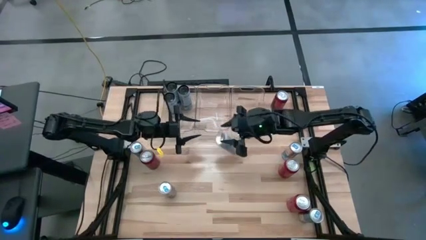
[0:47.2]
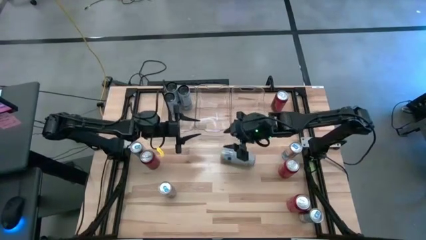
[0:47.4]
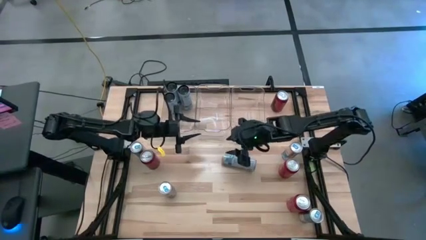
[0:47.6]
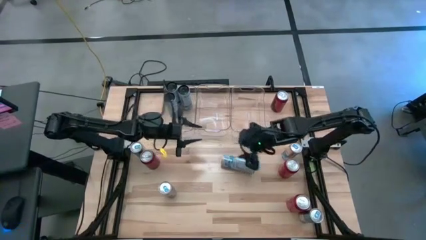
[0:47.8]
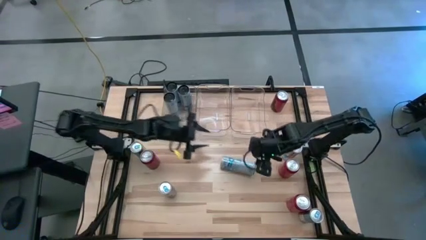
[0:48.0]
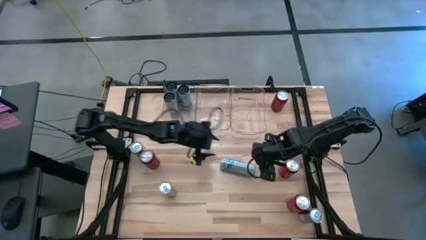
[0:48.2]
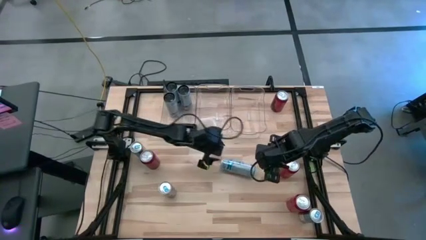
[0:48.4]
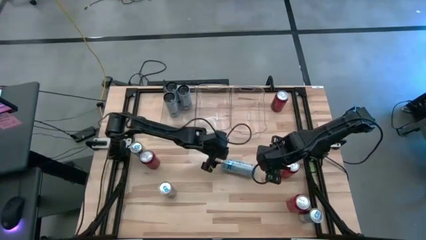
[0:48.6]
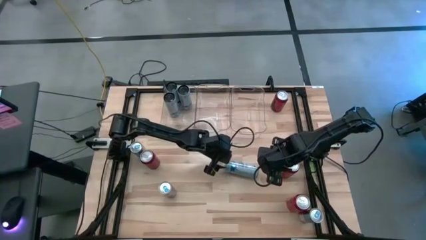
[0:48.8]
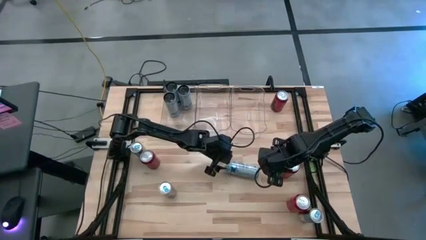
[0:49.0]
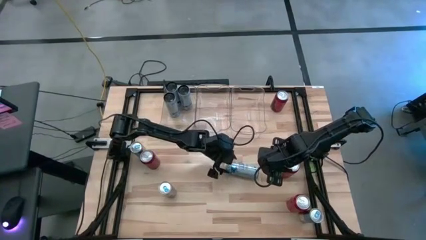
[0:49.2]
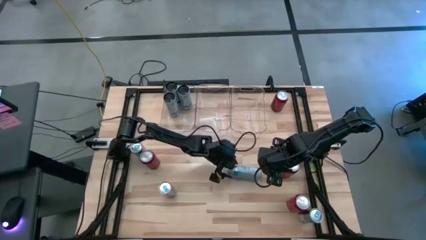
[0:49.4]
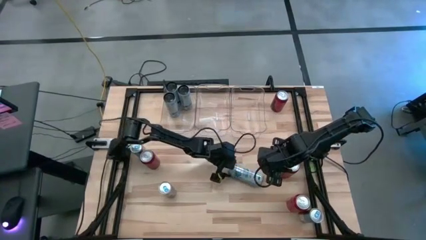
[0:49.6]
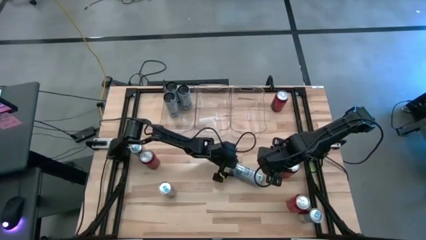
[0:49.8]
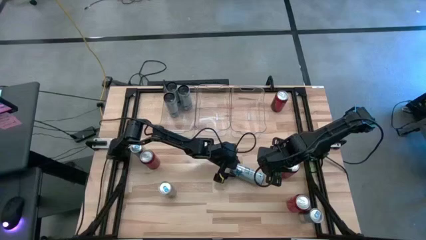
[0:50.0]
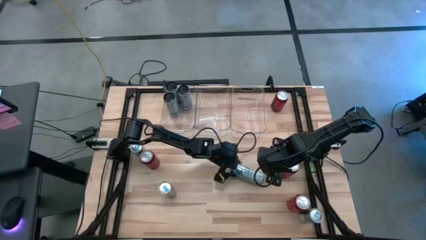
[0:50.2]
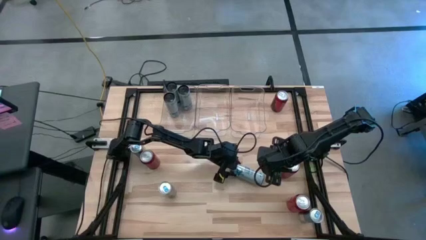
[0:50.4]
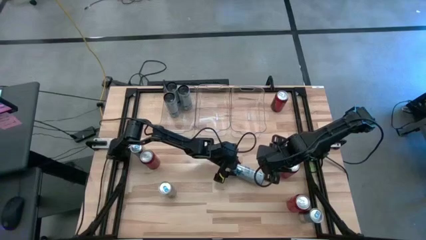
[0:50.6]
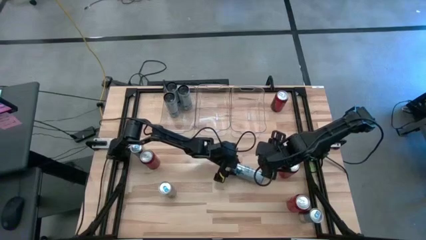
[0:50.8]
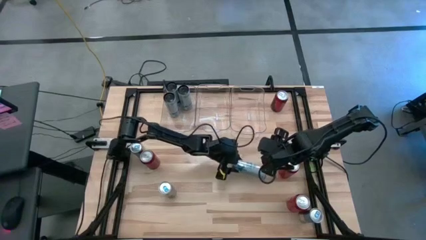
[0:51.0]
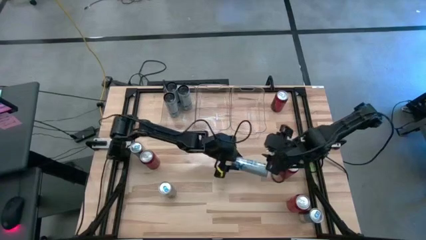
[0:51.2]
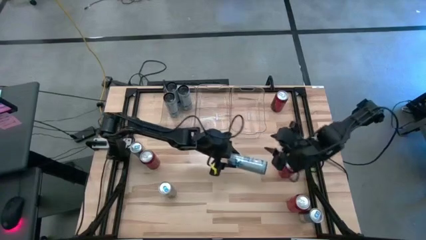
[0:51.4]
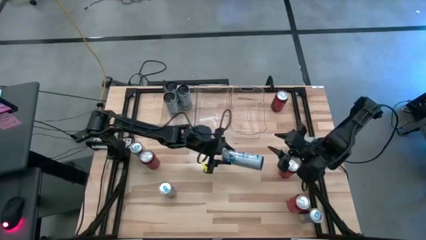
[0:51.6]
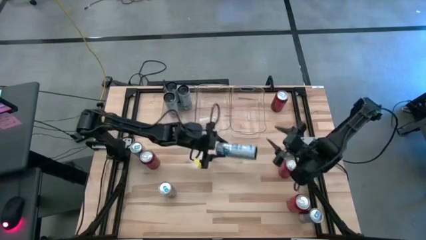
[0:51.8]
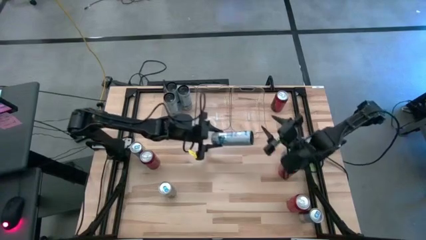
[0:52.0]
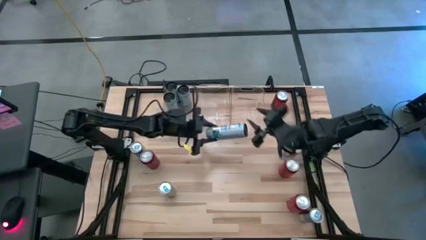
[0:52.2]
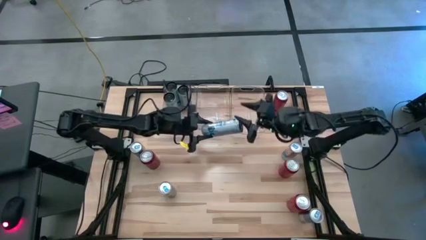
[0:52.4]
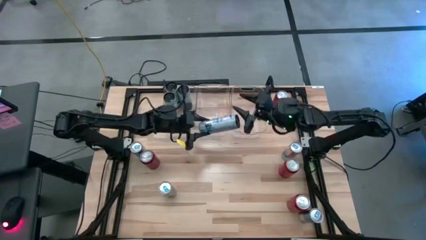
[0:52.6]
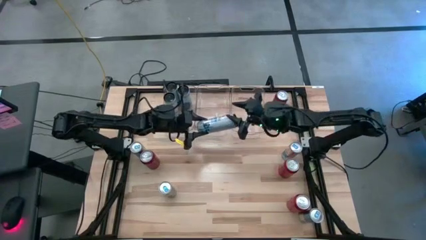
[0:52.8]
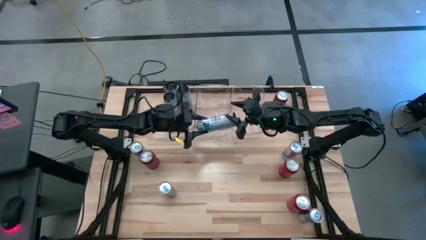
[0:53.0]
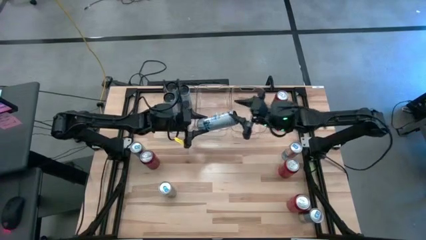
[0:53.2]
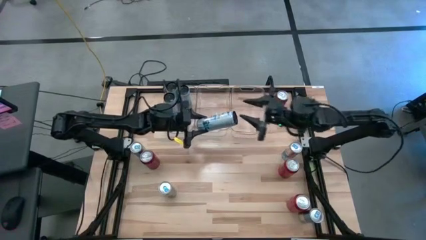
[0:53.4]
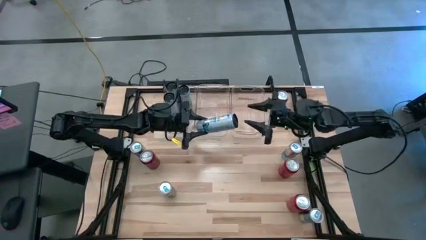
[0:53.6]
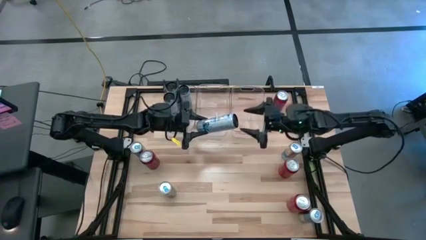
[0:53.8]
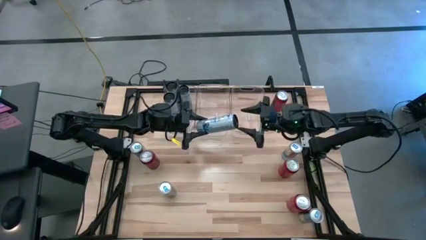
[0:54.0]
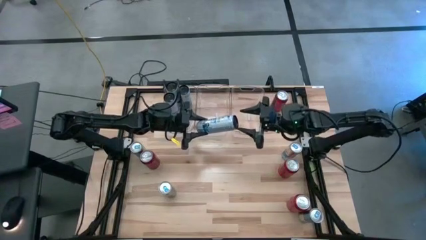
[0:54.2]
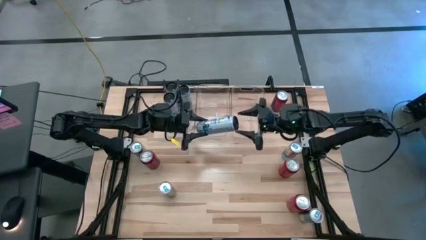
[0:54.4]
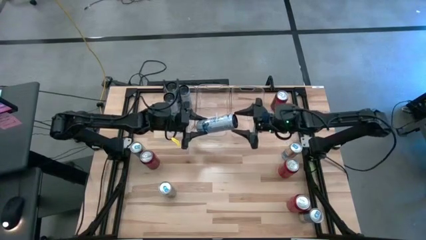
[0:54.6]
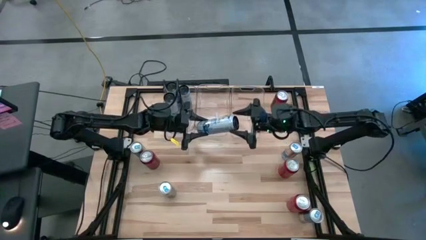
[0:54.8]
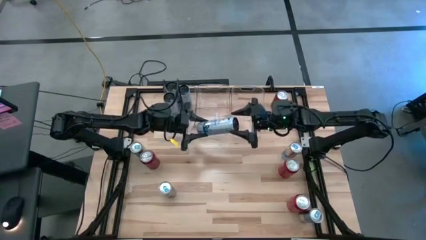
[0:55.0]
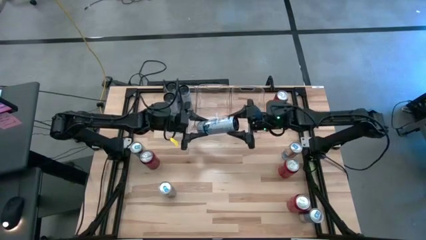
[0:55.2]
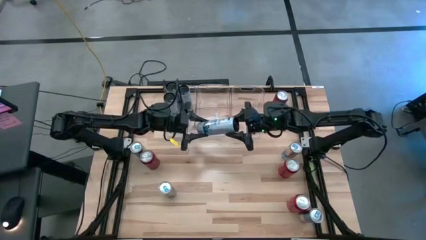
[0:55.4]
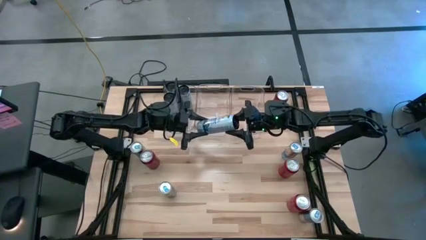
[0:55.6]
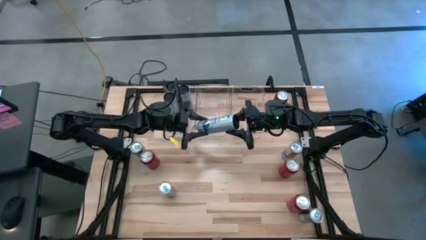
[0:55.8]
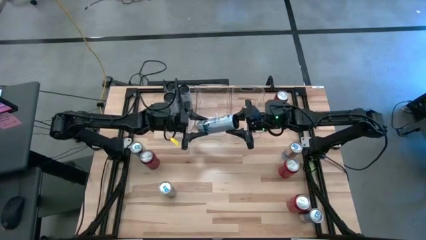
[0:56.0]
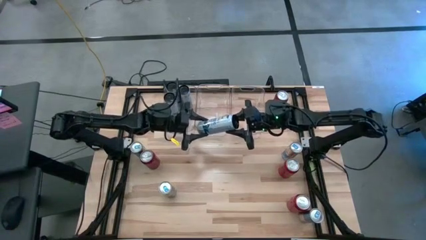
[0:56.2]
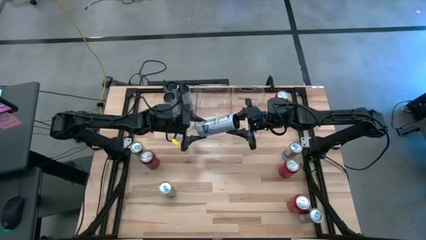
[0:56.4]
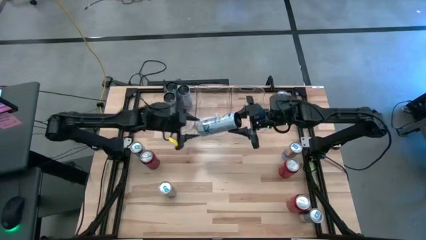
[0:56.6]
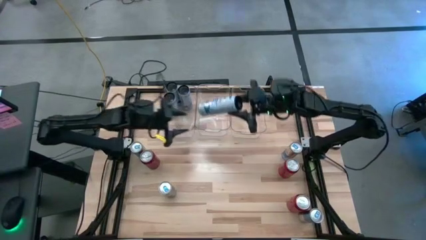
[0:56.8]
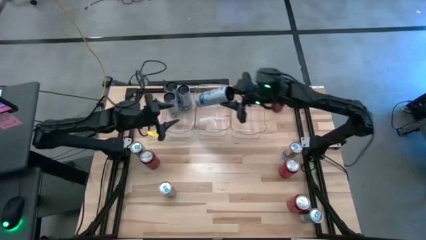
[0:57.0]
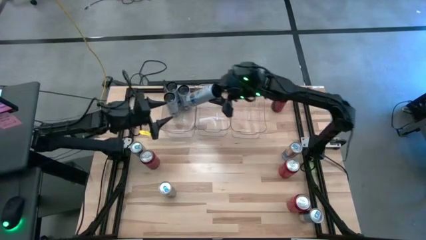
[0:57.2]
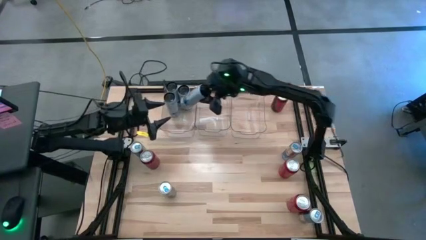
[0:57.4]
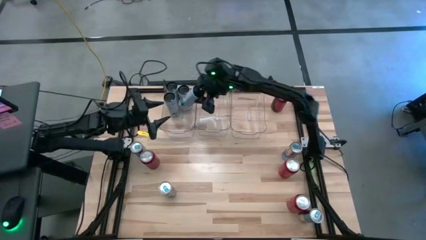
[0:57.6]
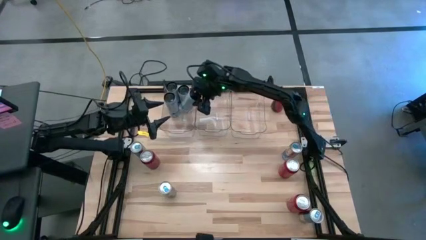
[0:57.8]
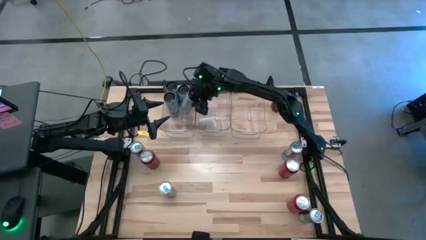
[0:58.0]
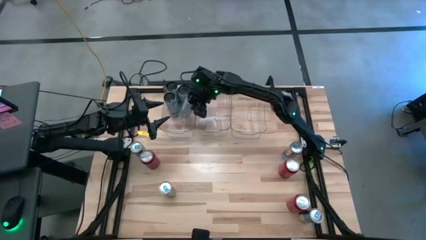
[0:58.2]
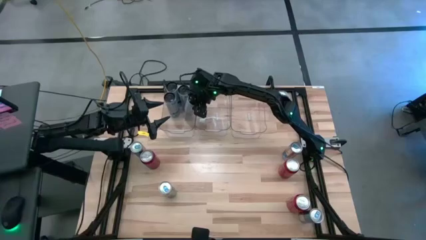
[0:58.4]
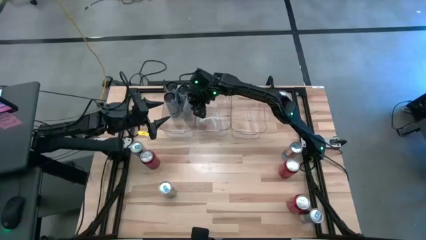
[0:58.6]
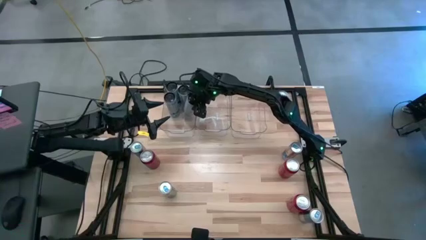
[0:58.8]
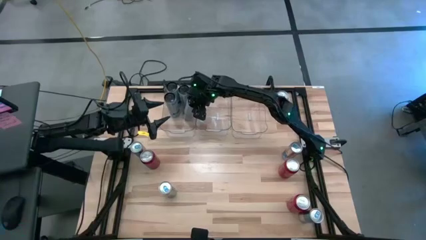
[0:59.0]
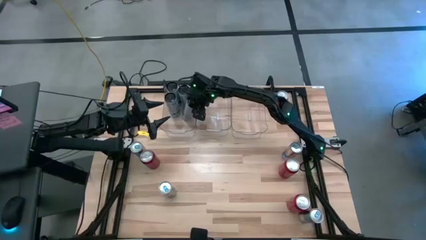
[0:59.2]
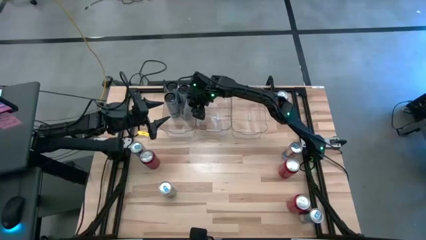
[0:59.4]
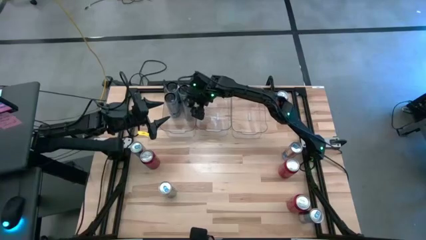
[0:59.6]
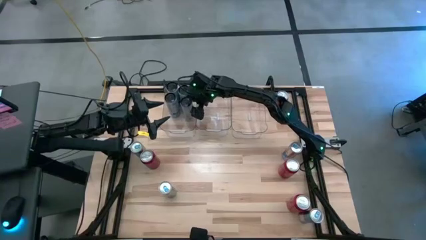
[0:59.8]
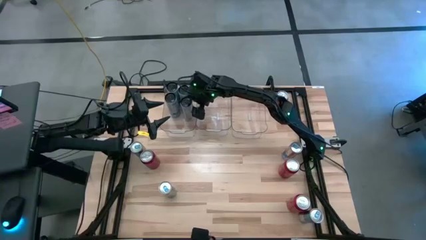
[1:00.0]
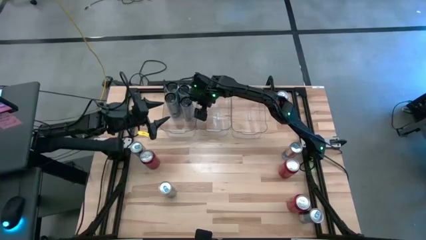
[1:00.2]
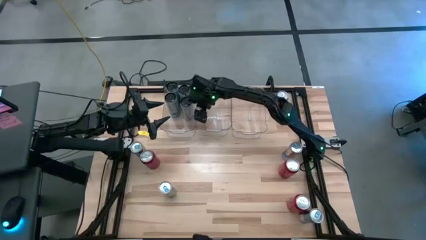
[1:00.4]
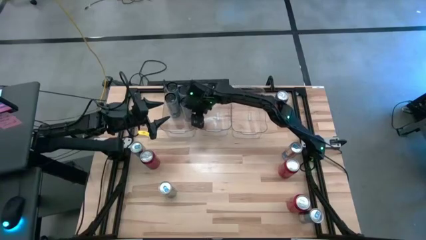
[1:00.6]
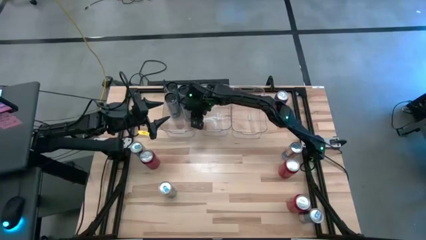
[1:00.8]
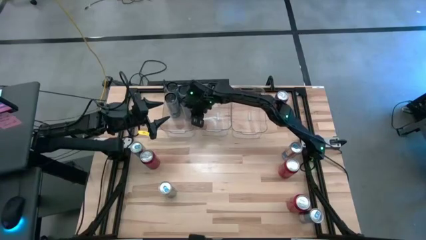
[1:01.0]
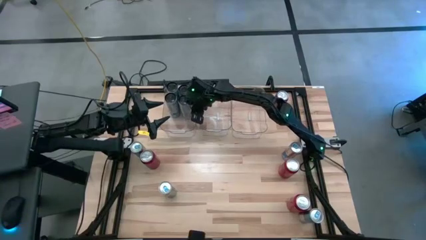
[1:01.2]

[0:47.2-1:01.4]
Task: Sort soda cans
Put the white-blue soda can into the left transparent bin
